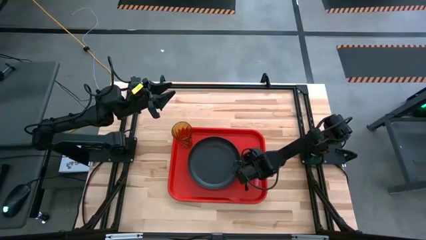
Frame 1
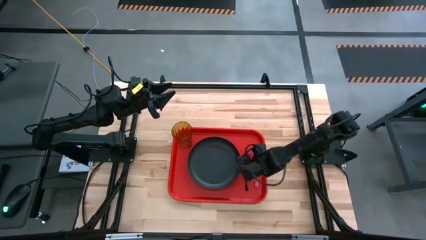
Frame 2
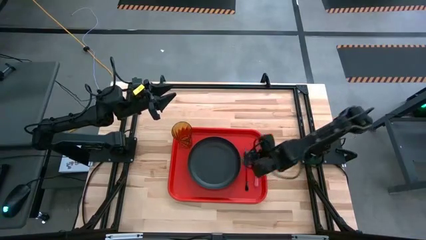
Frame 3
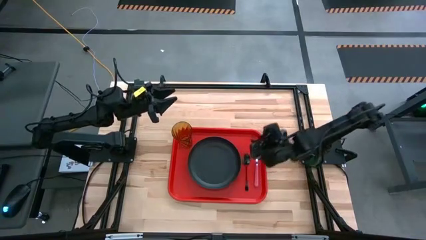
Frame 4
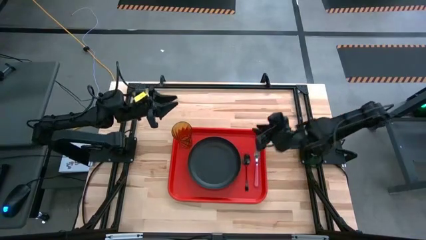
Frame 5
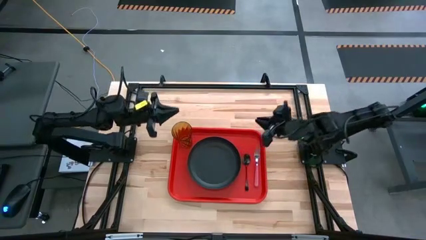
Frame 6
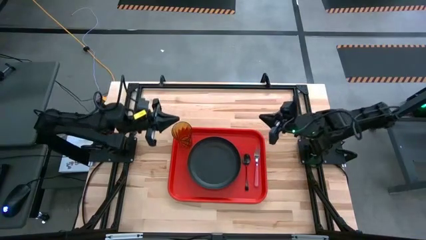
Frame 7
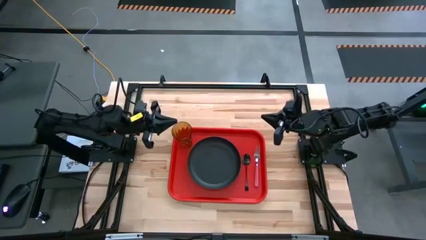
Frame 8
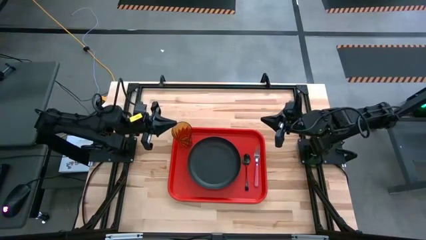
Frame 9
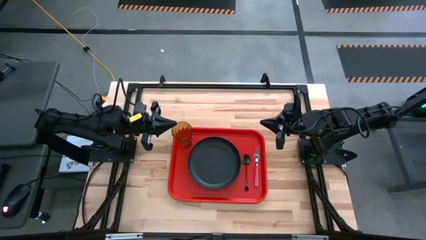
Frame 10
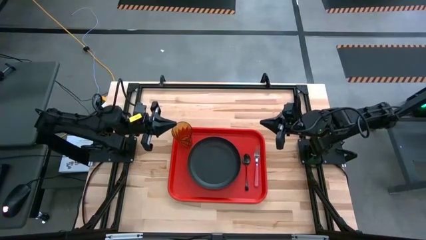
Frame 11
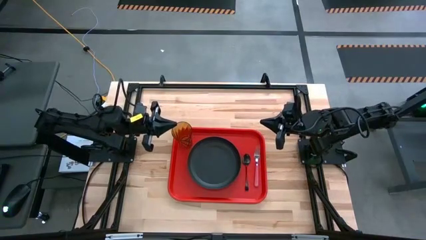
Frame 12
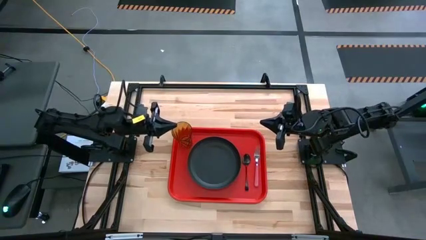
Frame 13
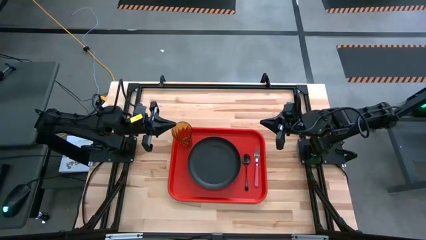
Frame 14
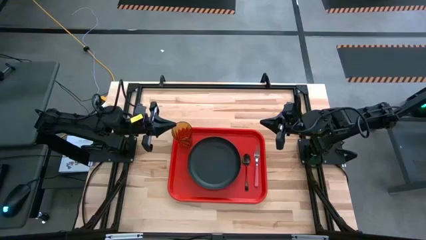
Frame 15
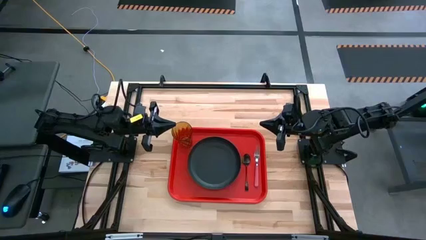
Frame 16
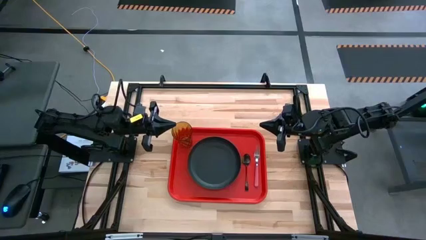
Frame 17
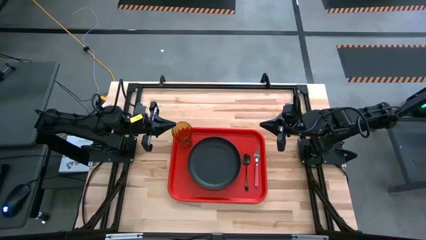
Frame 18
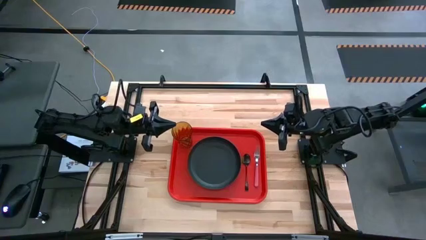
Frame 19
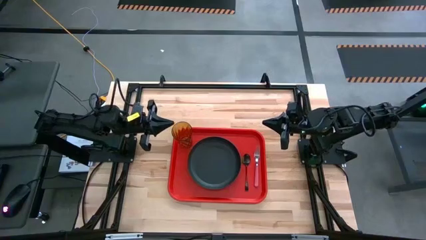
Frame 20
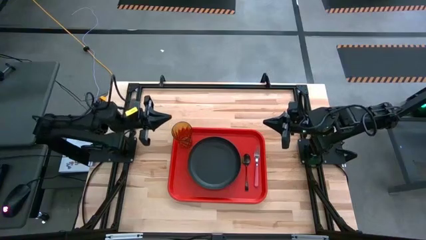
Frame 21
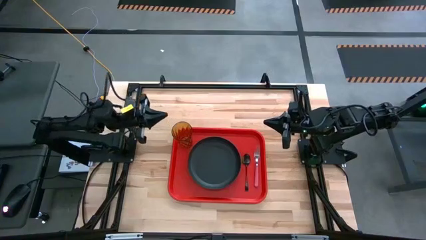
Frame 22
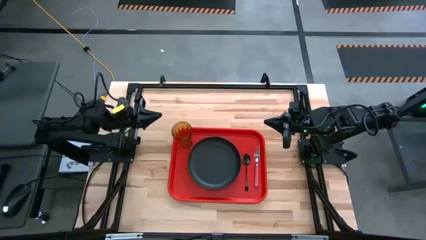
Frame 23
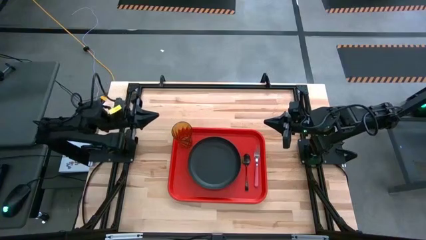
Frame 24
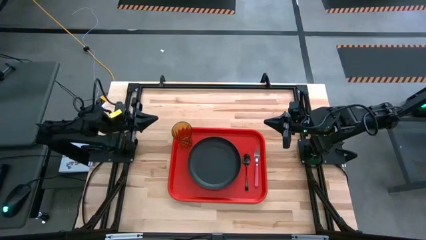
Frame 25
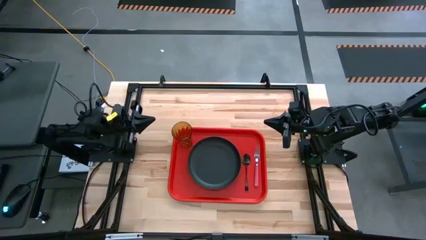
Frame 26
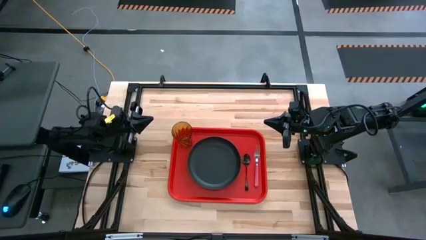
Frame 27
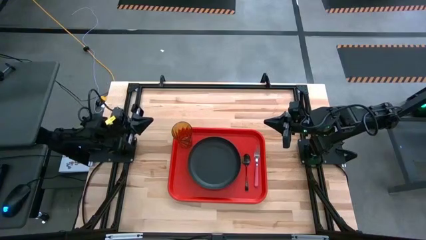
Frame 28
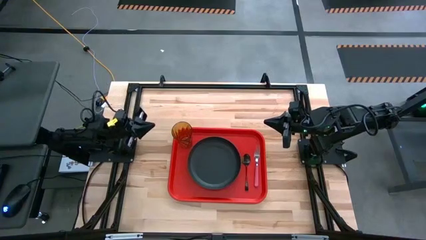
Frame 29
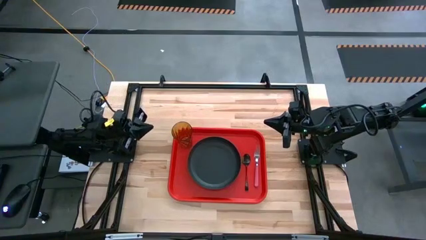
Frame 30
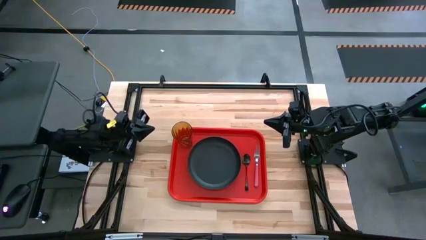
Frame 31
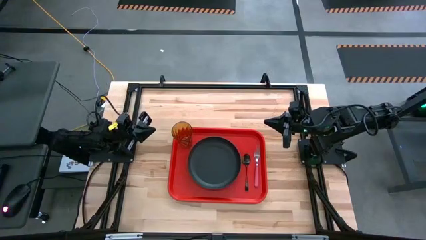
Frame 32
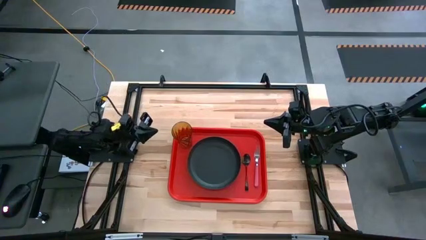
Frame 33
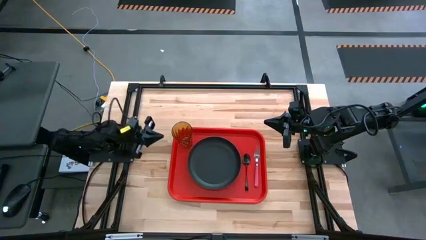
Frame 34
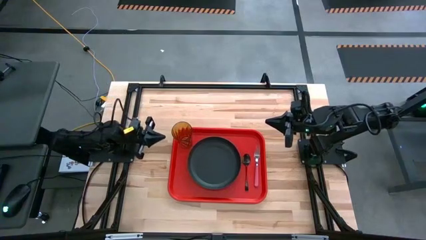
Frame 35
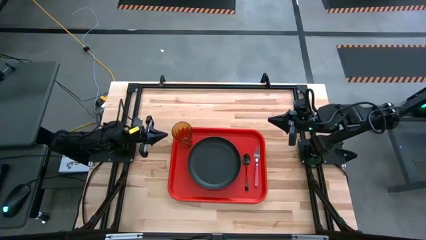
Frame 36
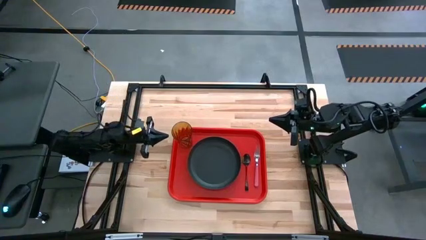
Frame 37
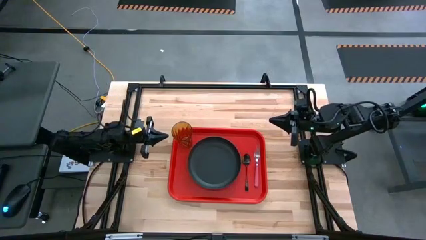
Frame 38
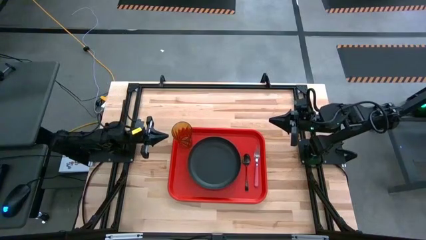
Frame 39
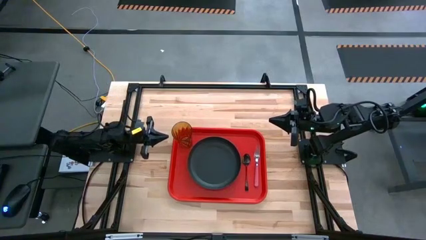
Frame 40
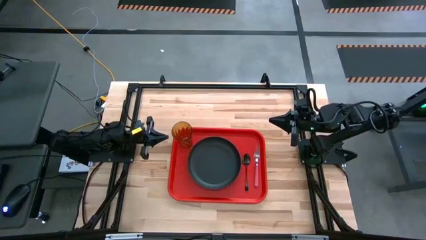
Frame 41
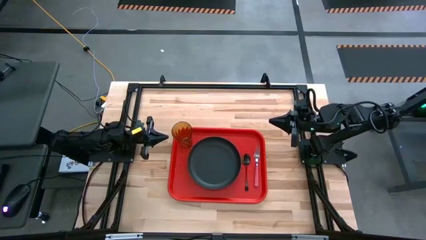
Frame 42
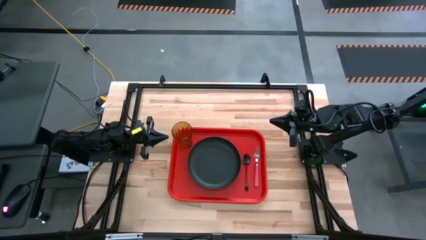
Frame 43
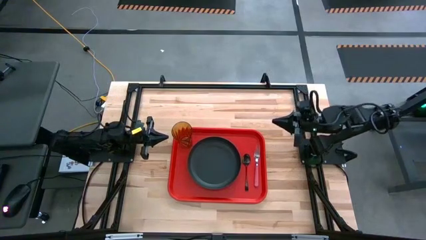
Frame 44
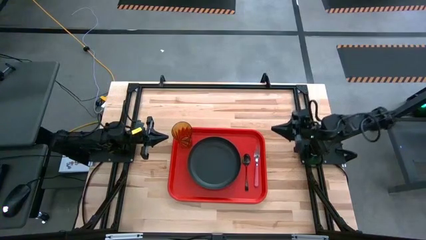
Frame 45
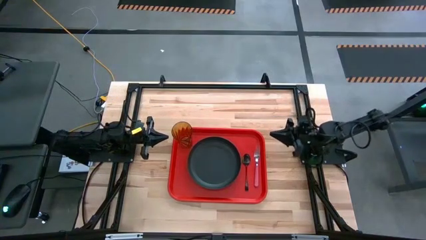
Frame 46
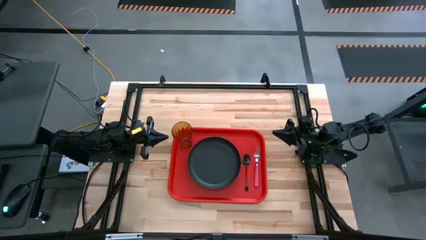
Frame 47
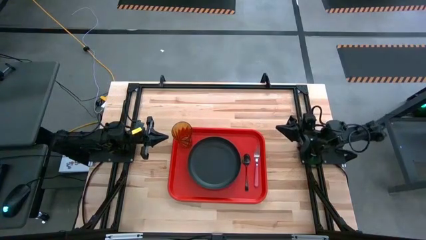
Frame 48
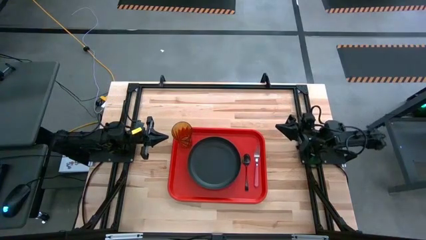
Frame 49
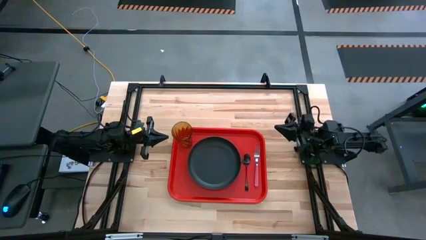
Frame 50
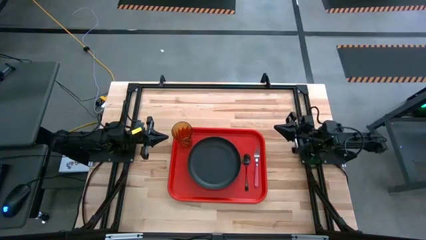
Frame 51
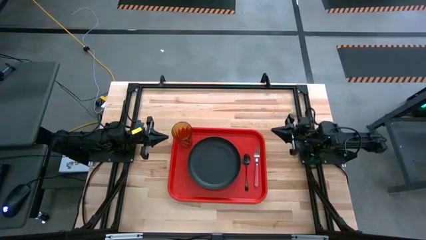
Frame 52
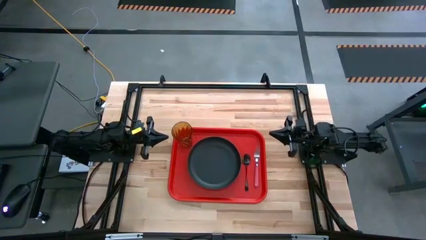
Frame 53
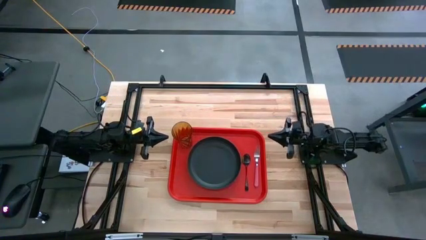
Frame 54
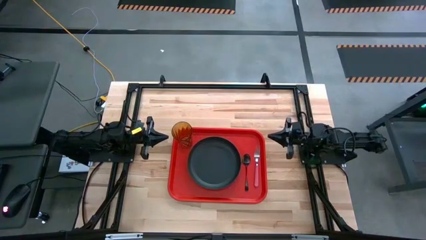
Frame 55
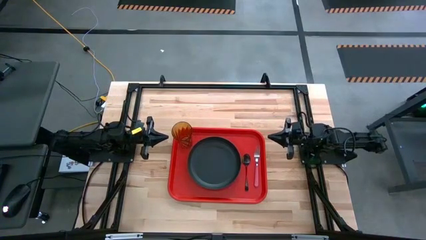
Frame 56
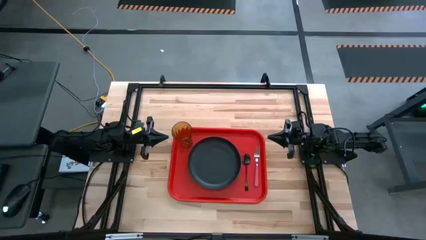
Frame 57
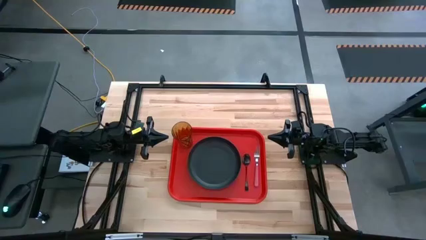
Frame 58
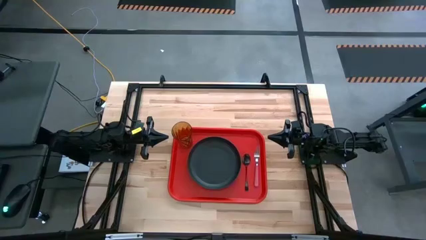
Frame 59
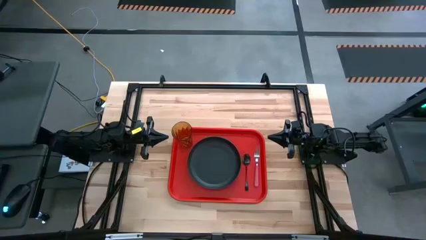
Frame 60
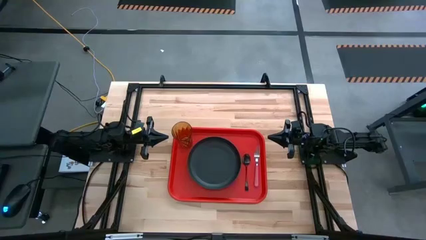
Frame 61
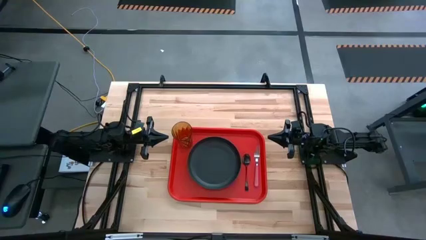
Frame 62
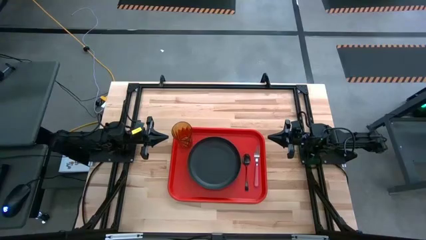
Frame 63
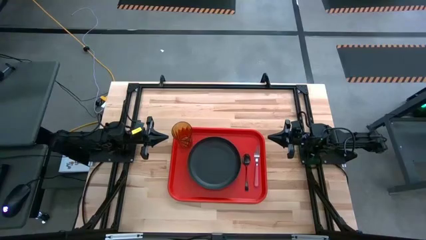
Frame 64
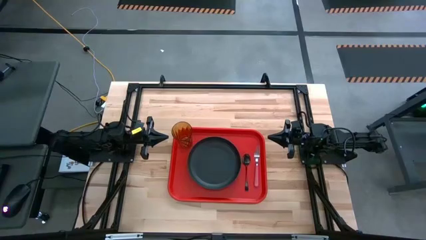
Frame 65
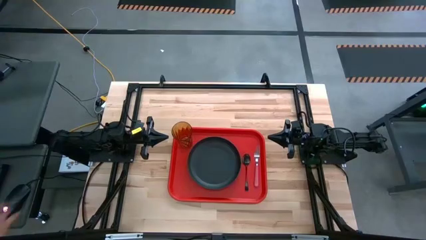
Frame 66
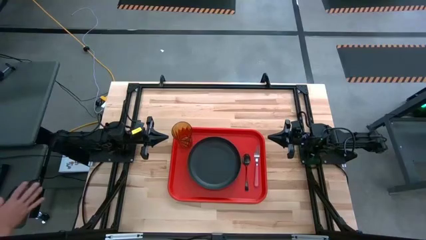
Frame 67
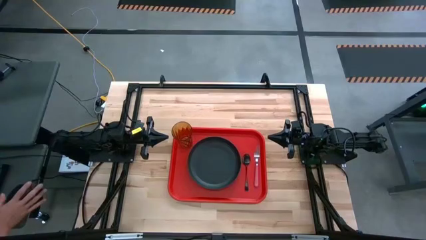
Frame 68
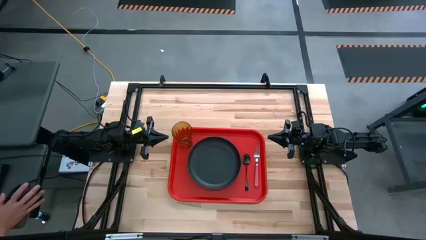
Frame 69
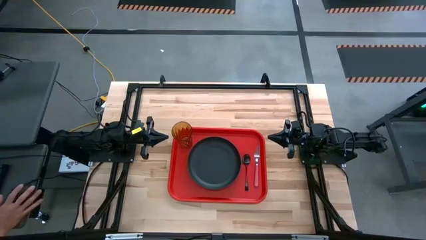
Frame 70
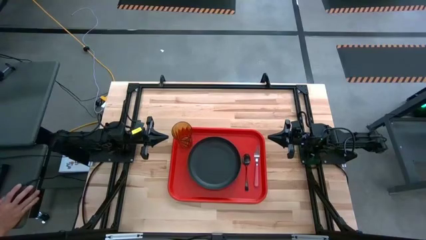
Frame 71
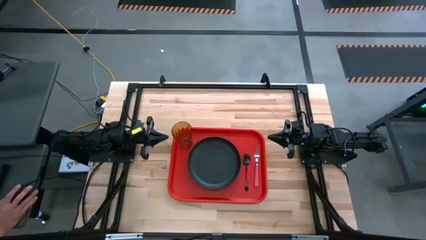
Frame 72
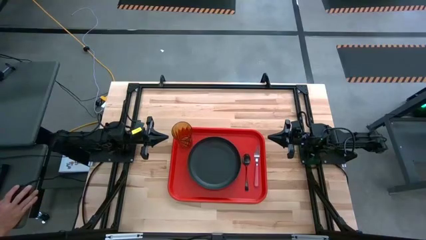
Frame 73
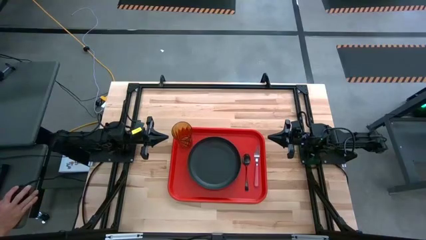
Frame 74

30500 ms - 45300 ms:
Task: Pick and place plate/cup/fork/spoon on tray
Return to Home Position

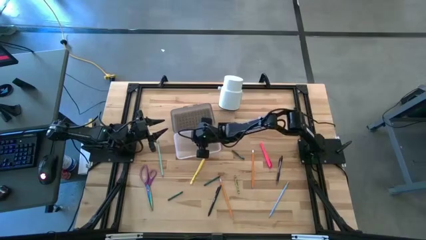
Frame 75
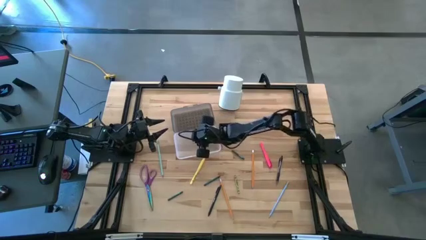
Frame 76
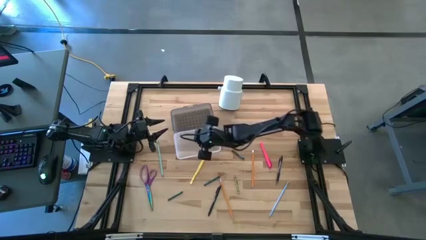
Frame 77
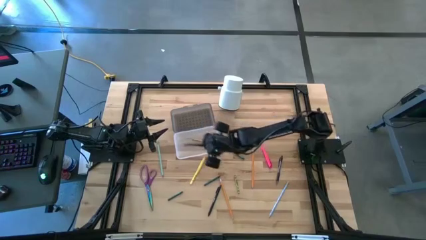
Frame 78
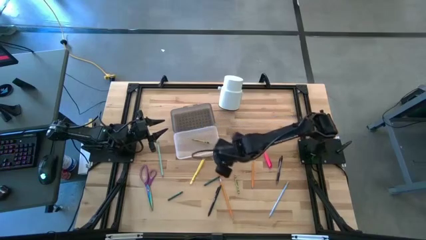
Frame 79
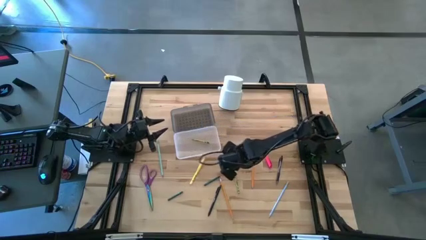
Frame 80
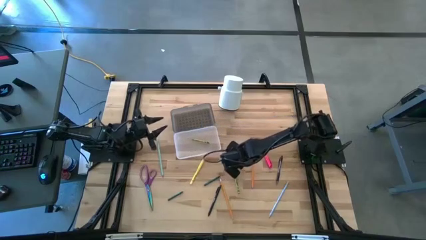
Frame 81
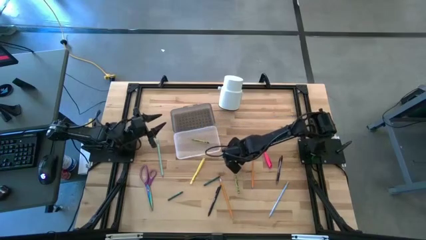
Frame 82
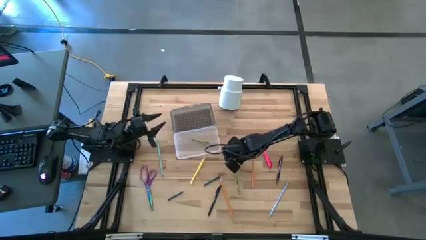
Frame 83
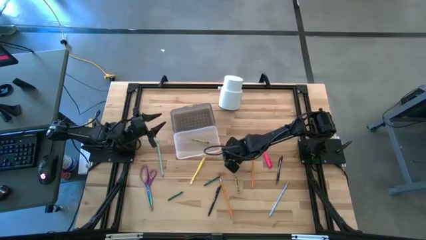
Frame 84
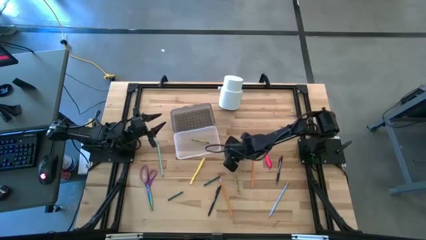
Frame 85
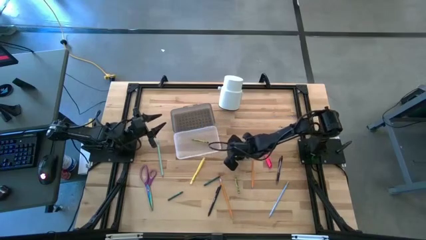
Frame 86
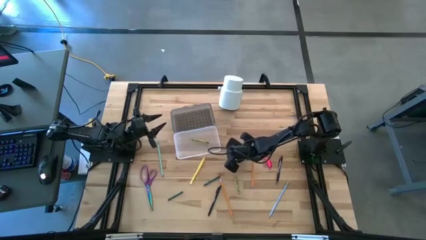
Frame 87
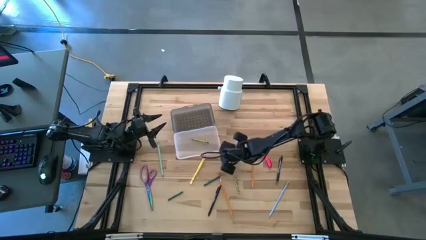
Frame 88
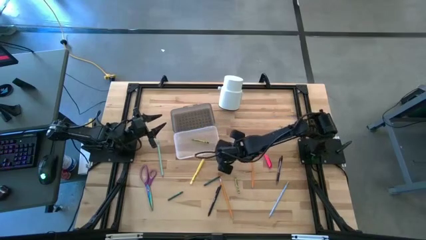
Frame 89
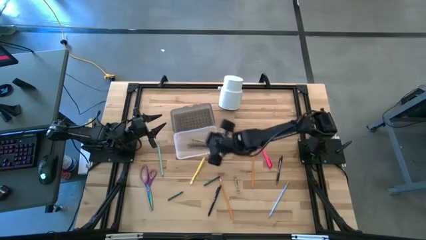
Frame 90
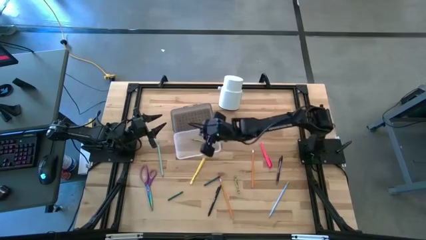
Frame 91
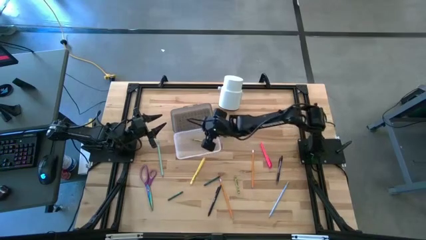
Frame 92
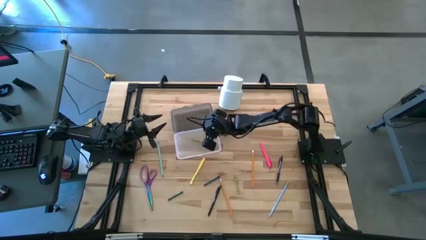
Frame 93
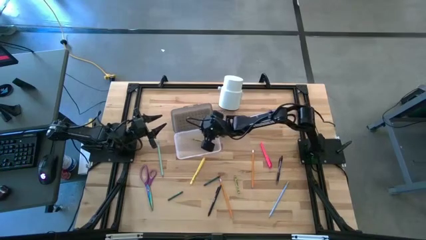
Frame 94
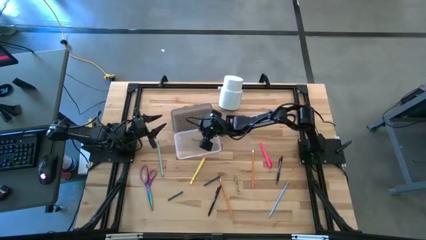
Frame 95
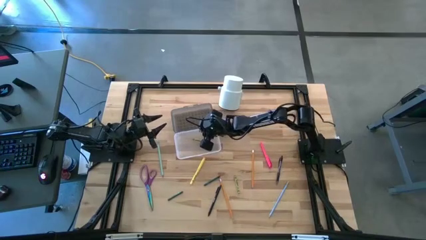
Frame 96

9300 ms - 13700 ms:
Task: Pick & place school supplies into a supply box
Put the top right green crayon into the black supply box
